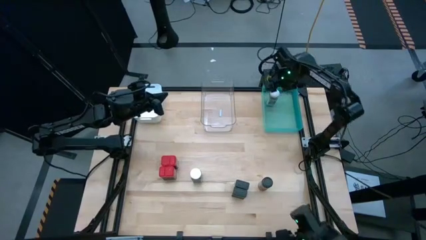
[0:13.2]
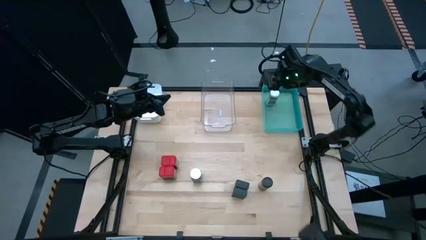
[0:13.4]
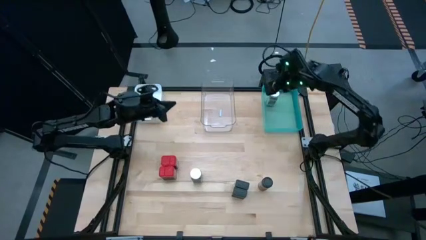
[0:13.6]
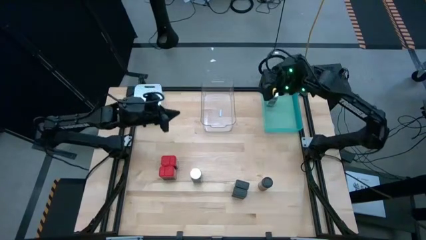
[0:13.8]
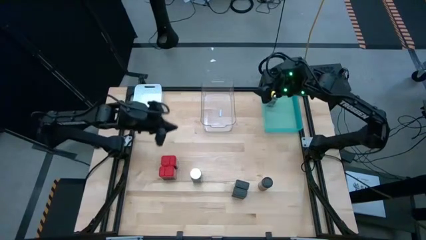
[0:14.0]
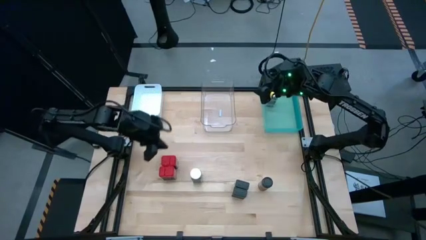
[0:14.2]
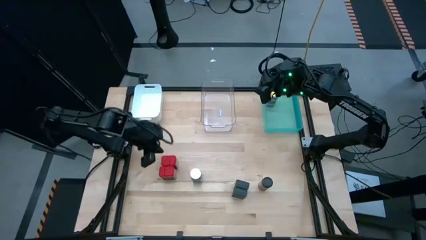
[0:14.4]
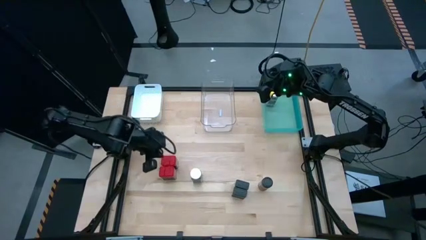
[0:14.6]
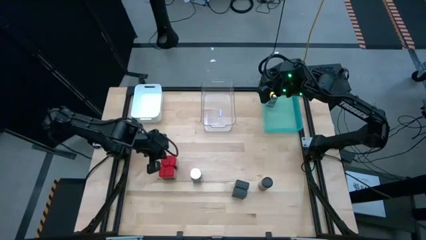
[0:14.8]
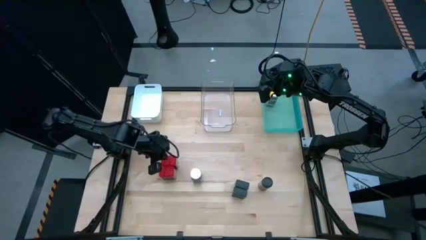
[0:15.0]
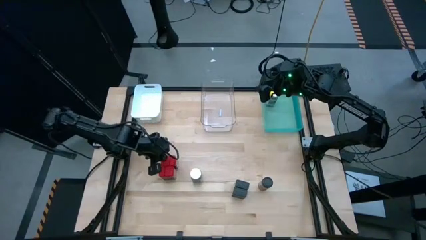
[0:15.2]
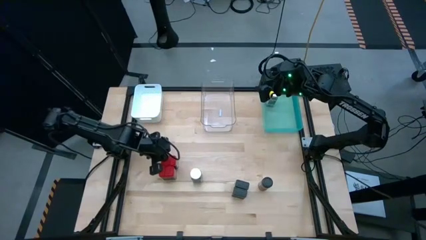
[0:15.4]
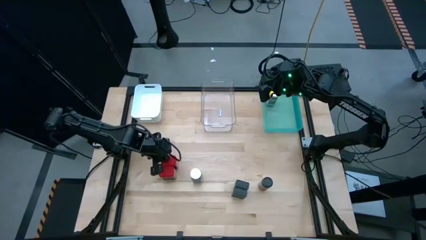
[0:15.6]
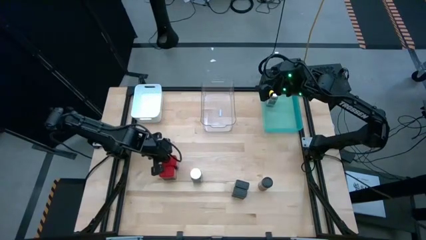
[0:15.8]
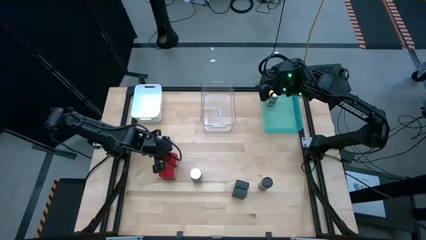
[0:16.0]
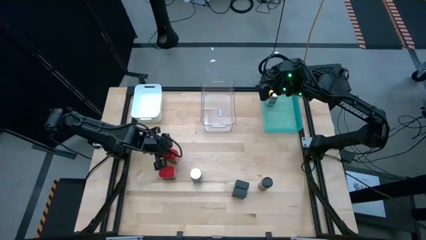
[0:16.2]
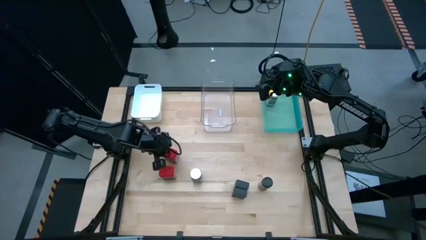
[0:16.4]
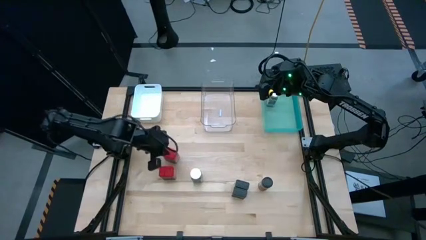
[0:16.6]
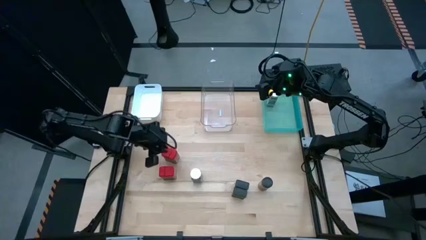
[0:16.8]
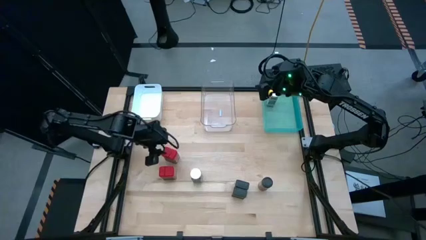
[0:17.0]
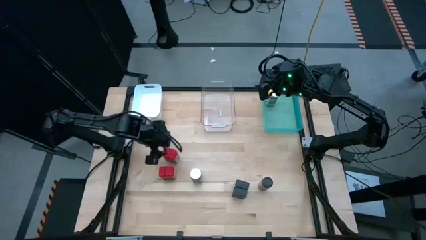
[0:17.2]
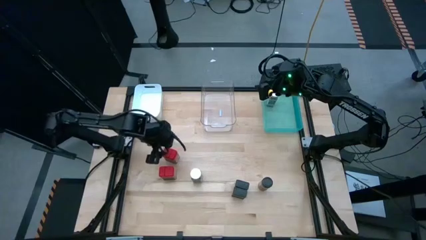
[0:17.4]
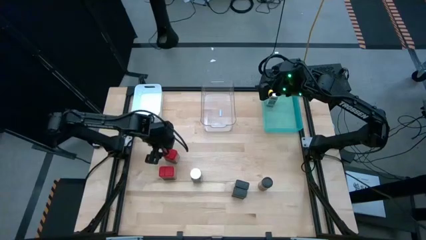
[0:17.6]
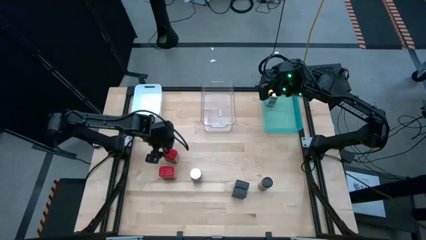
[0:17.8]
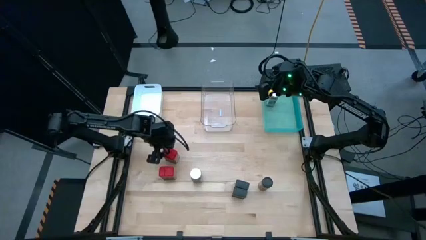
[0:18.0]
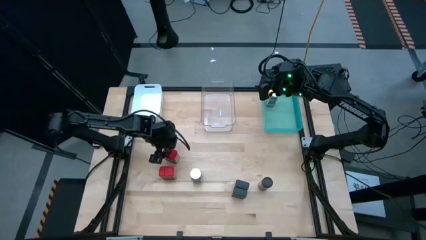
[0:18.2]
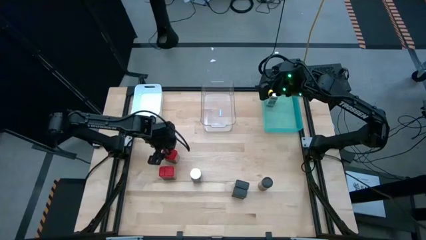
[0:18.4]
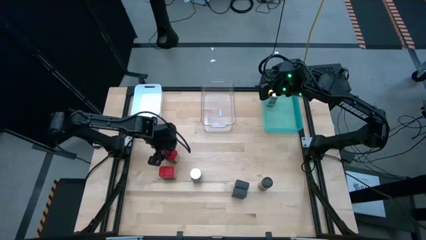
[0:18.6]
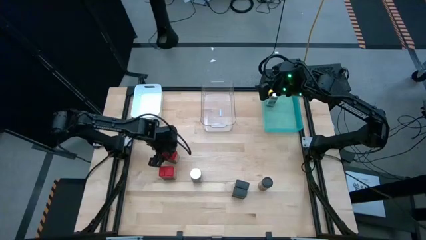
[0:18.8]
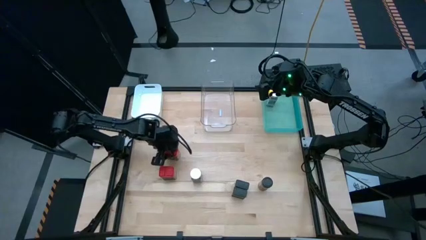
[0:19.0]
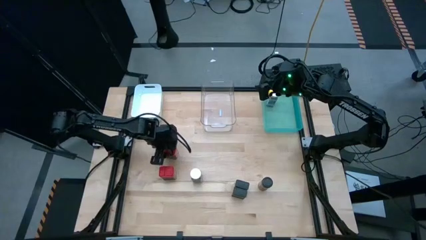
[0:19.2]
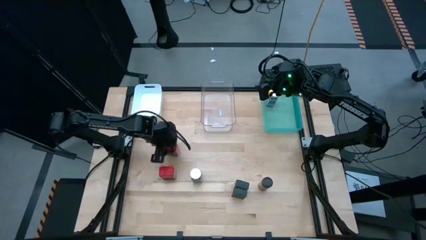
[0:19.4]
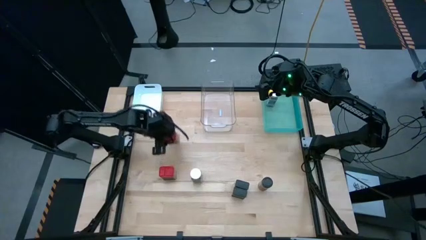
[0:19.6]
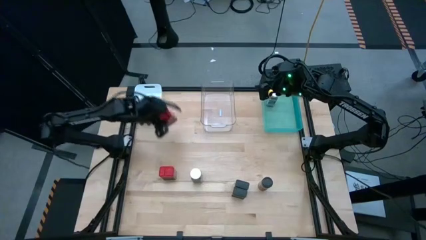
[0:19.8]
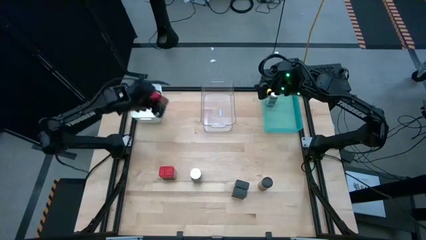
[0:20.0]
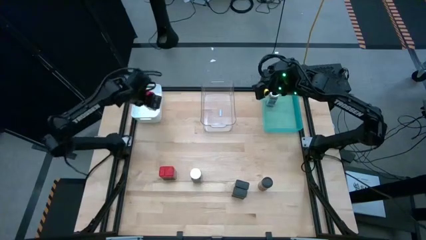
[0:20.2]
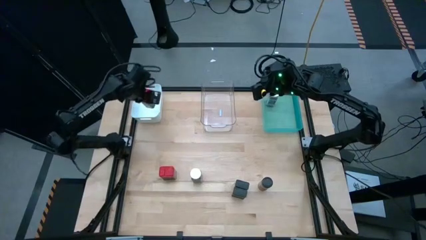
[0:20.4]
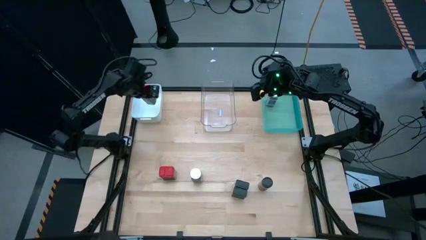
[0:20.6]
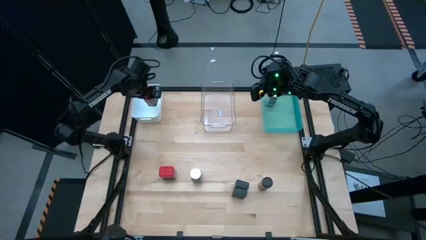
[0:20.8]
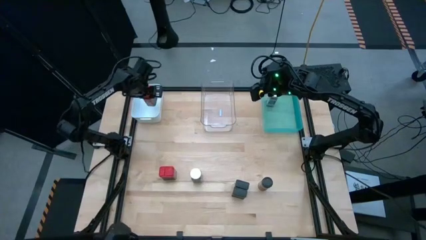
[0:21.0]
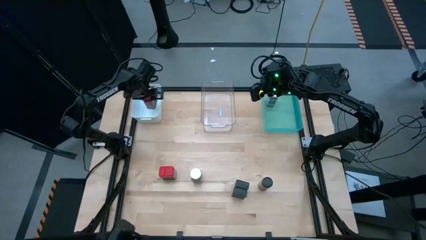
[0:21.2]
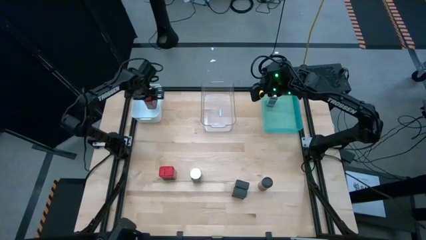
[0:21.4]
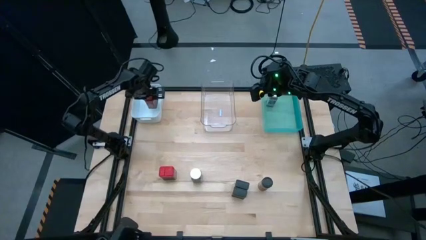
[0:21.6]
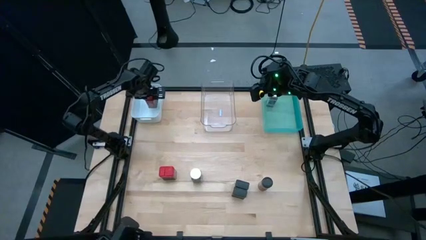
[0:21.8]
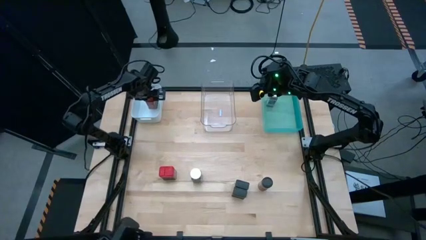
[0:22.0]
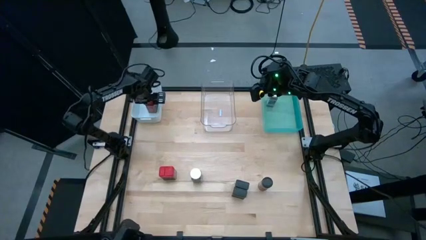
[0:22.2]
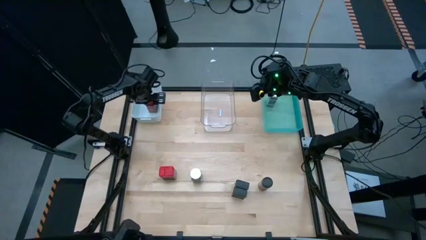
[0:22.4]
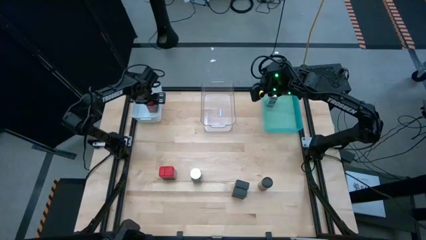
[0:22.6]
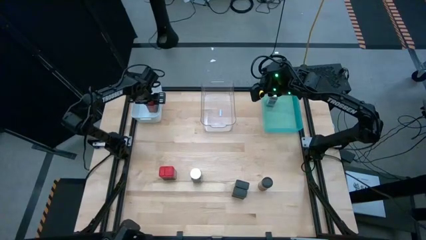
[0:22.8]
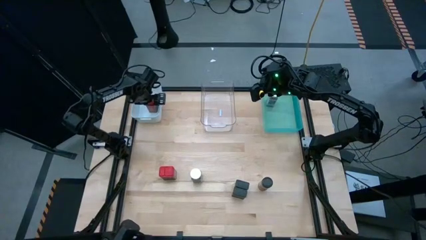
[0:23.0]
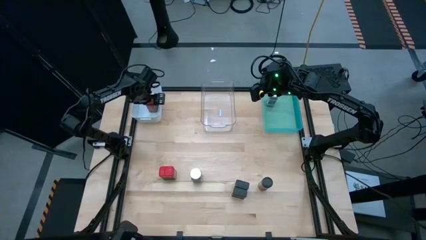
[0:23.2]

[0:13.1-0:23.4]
Task: Sort spices by type
Put the top red seasoning can into the white bin
